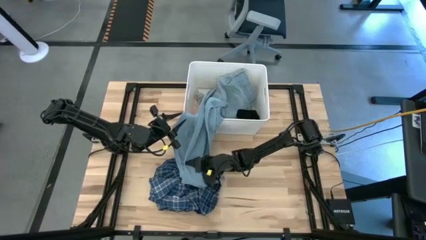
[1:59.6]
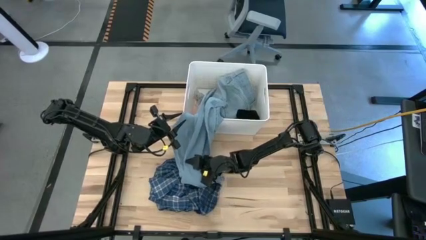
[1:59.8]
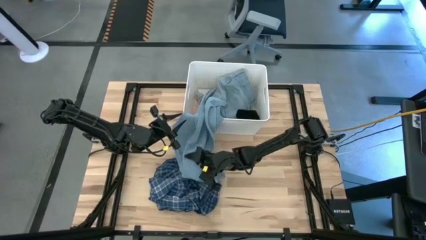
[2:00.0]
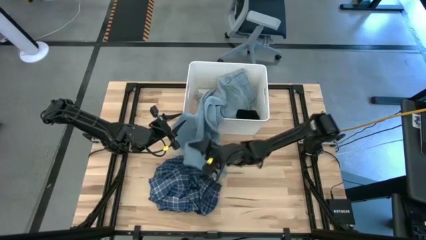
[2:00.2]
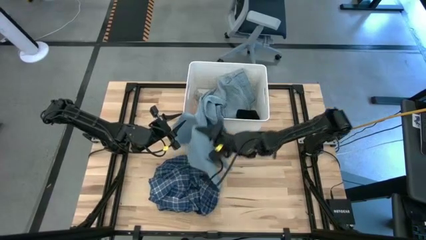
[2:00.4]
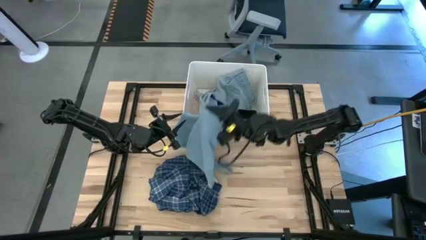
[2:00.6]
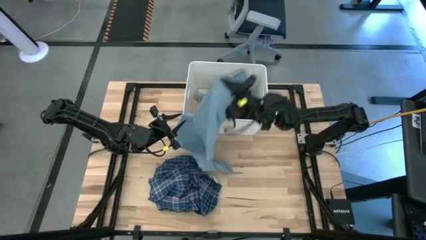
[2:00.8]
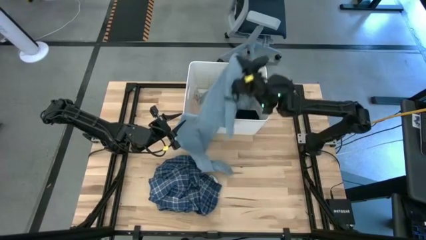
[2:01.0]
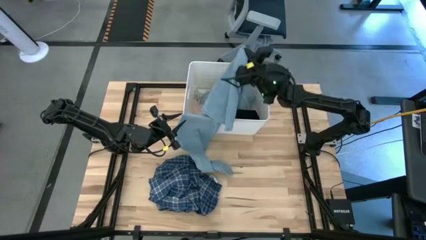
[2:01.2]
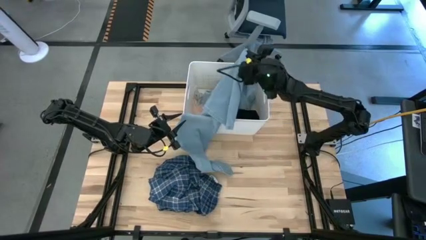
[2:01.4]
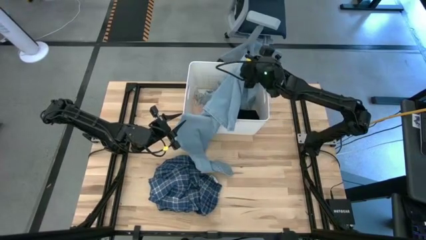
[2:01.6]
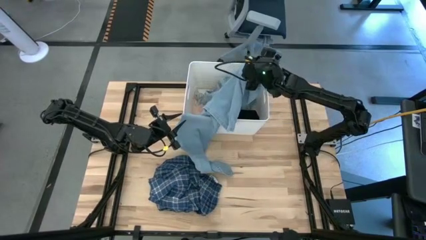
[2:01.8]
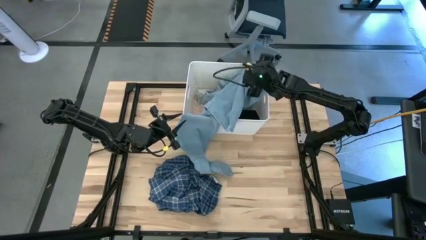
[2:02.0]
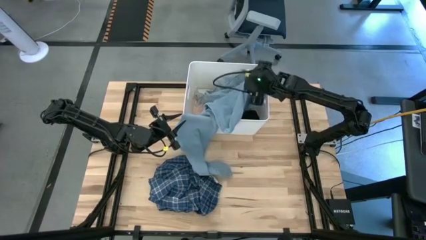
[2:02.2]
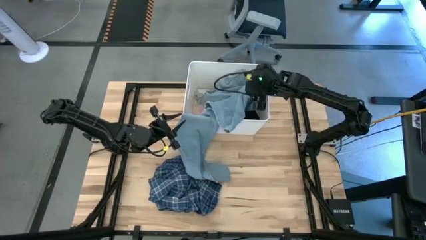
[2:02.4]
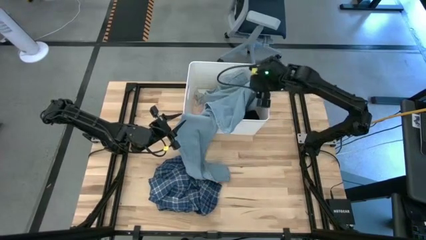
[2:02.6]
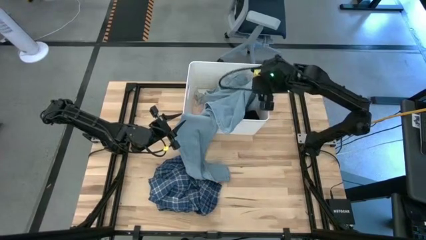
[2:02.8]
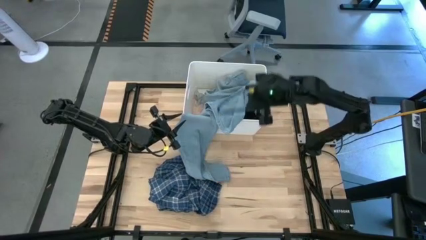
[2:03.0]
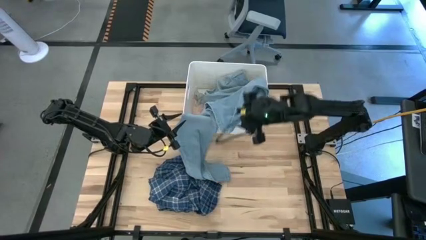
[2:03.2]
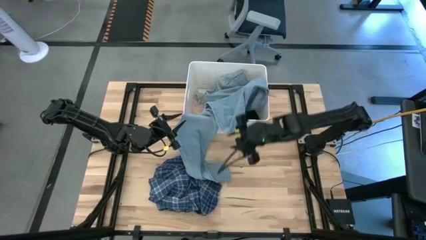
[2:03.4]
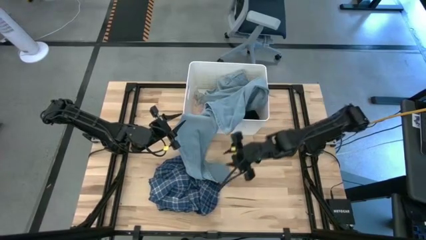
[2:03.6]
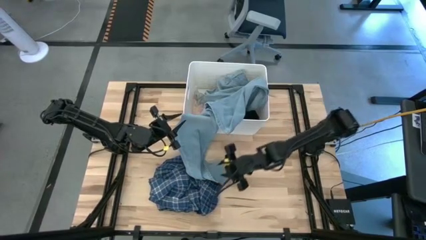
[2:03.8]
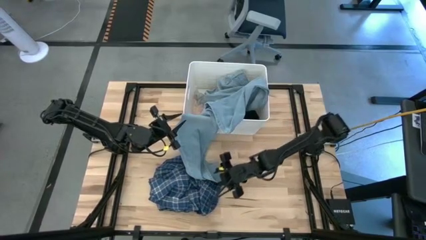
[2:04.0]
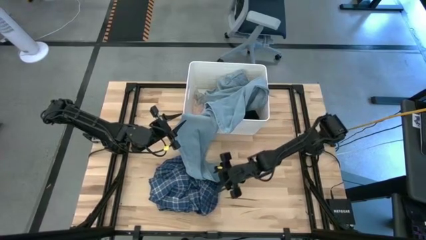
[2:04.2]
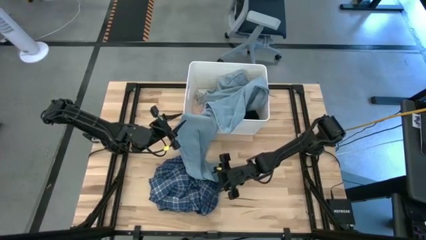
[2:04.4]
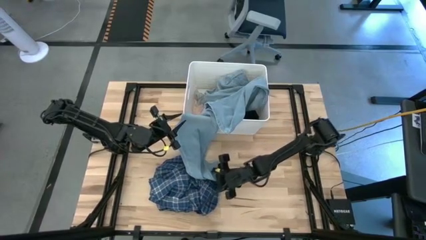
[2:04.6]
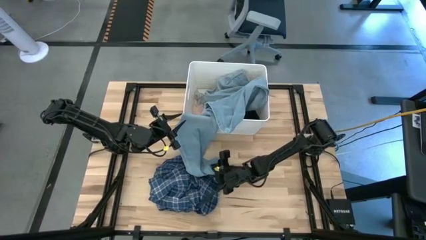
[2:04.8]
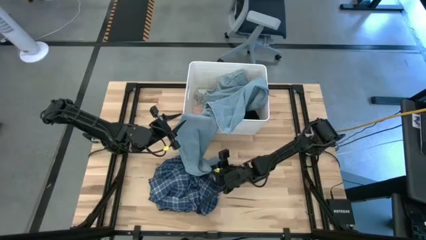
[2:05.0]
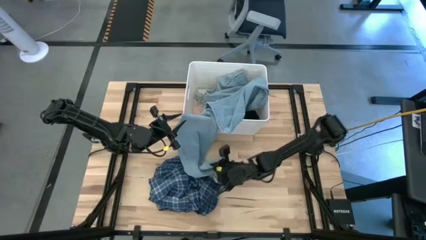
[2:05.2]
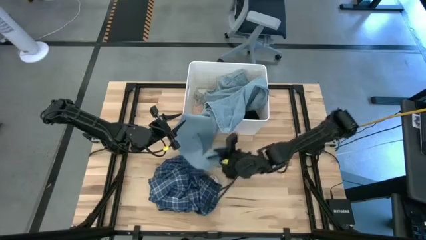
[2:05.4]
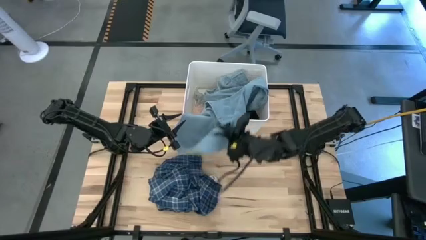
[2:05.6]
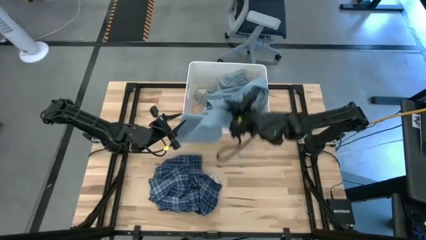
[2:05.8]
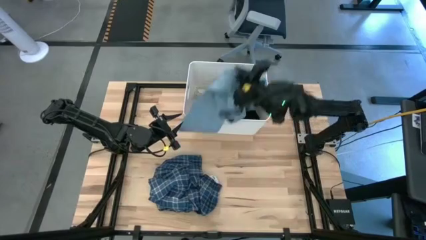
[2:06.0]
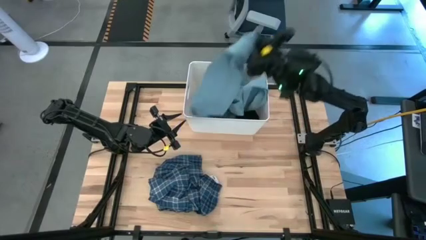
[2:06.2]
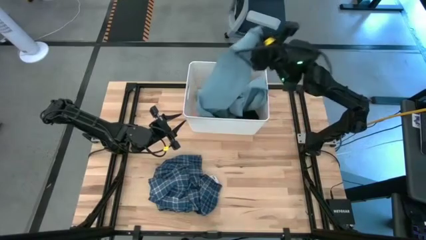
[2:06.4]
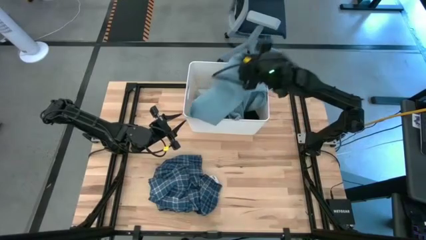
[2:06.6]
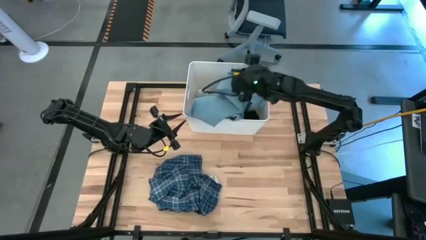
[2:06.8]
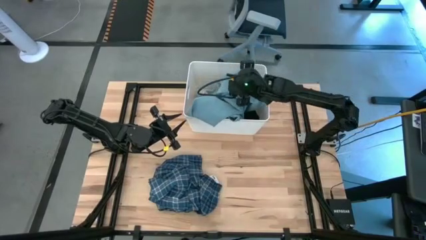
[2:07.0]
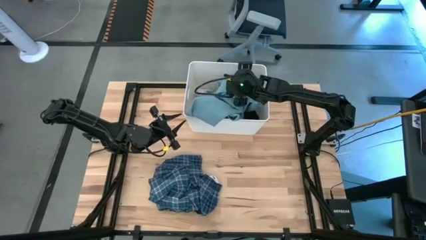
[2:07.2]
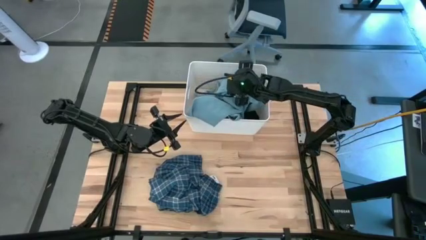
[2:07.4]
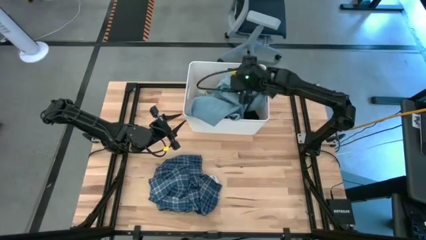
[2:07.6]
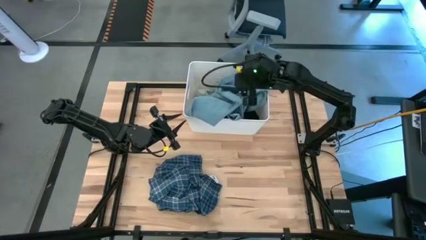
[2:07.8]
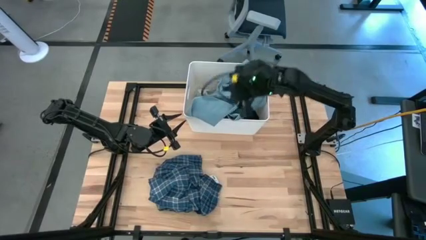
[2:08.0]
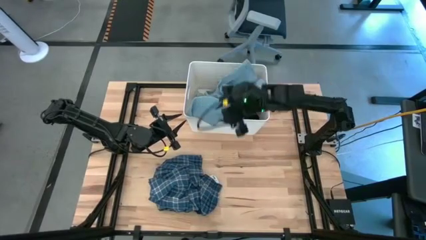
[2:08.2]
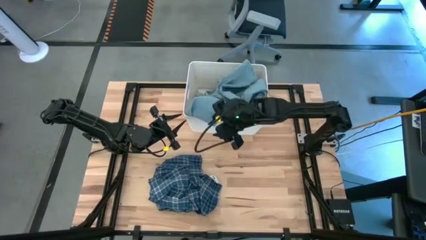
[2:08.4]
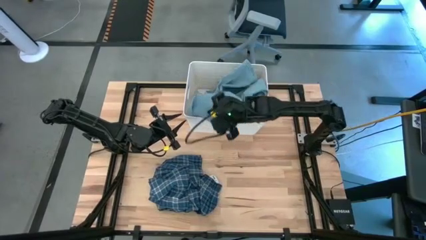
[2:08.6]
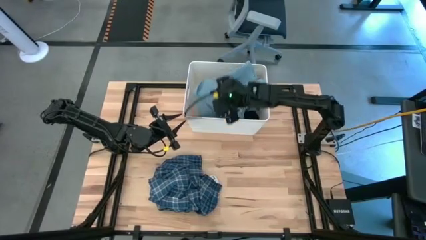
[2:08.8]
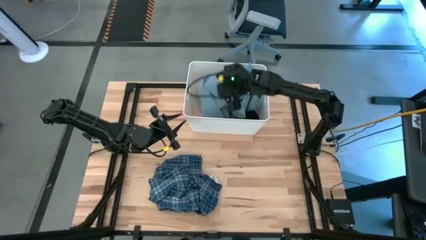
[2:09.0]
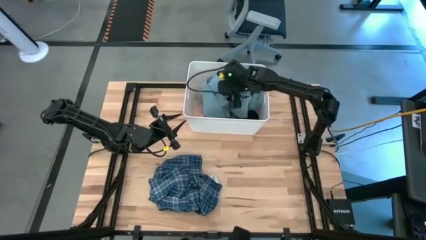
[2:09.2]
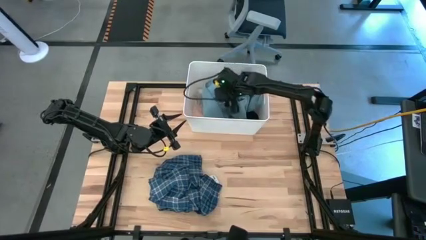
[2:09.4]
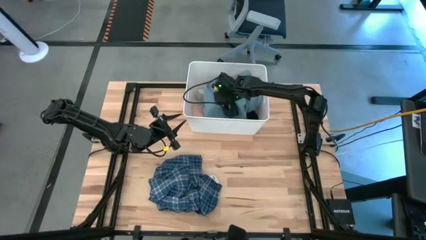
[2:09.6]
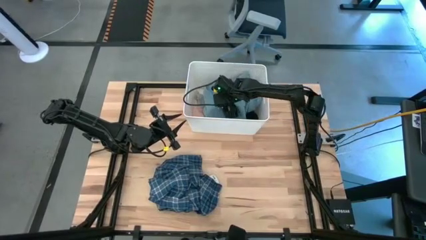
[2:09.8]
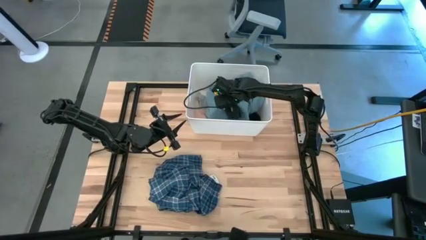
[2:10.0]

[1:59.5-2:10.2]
Task: Sort clothes
Put the blue pants into the white laundry bin

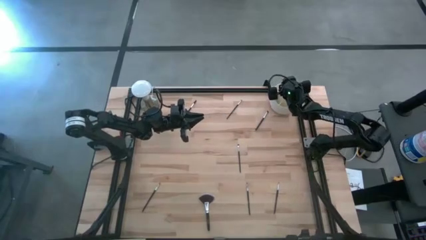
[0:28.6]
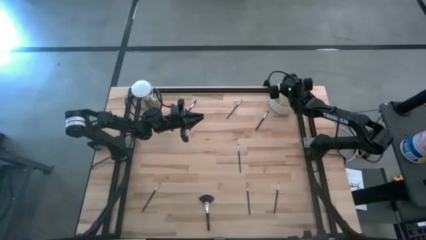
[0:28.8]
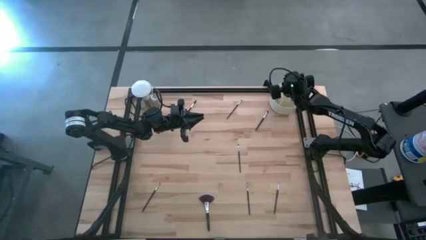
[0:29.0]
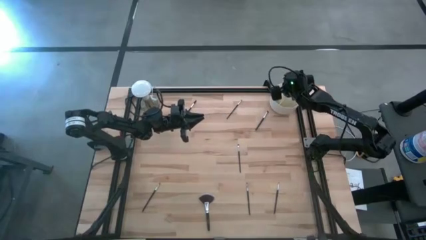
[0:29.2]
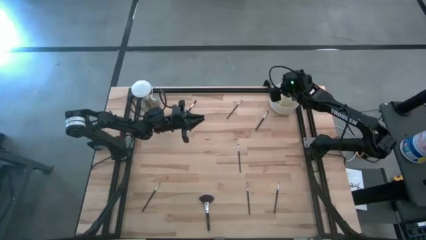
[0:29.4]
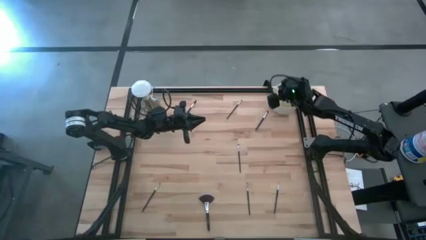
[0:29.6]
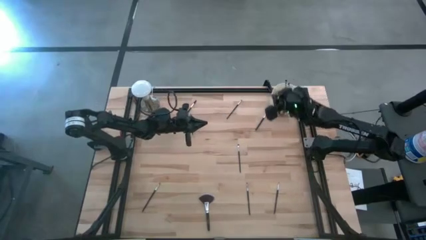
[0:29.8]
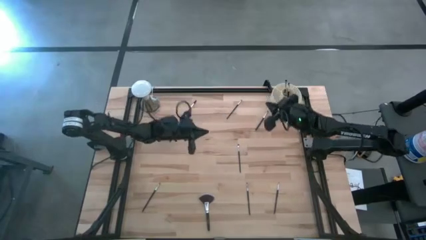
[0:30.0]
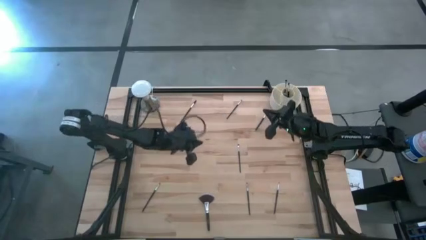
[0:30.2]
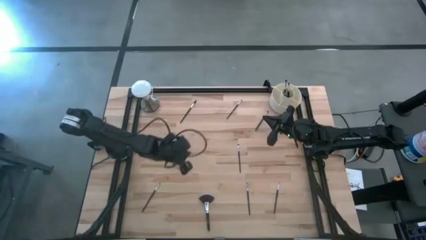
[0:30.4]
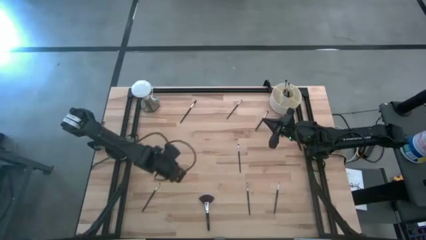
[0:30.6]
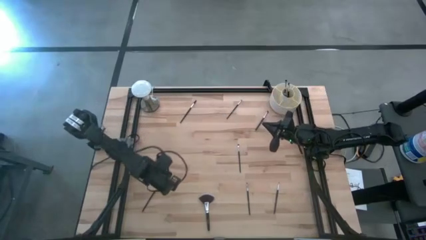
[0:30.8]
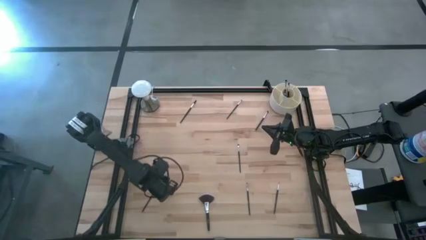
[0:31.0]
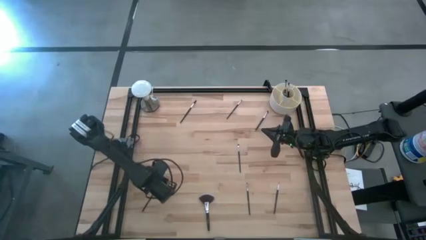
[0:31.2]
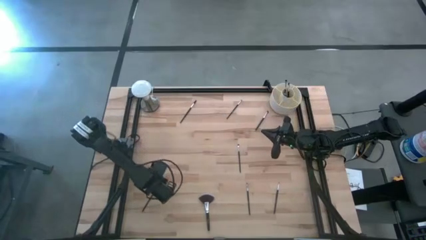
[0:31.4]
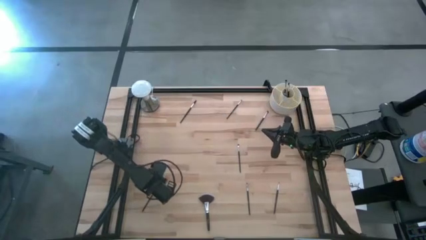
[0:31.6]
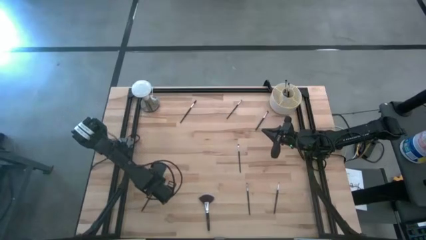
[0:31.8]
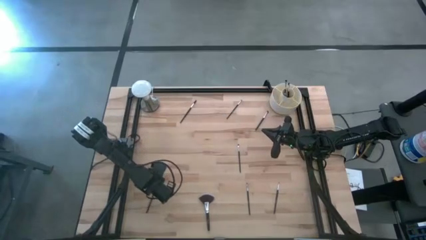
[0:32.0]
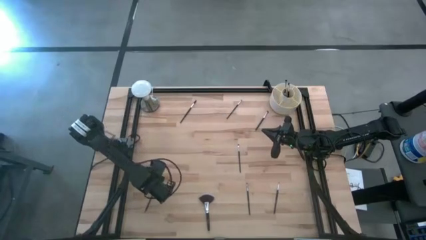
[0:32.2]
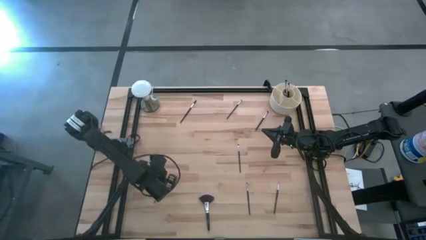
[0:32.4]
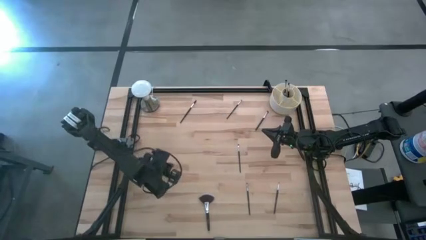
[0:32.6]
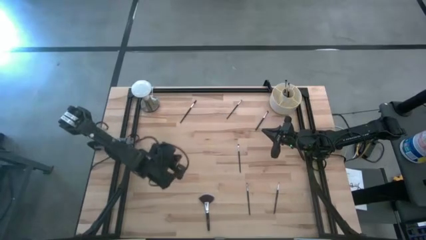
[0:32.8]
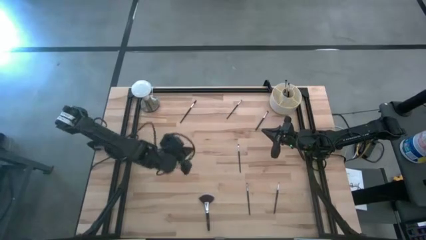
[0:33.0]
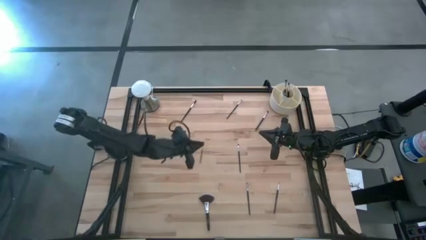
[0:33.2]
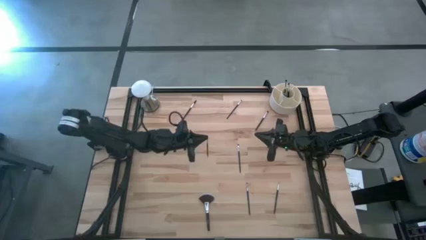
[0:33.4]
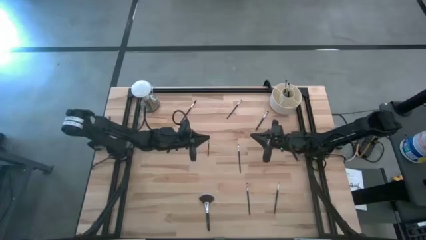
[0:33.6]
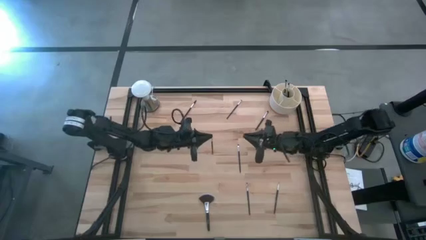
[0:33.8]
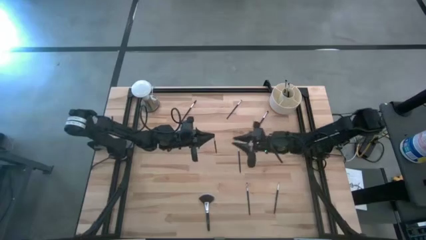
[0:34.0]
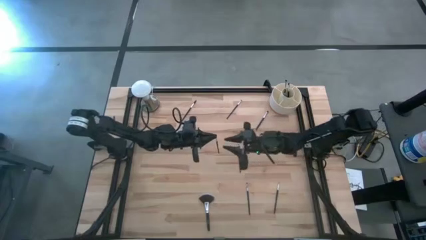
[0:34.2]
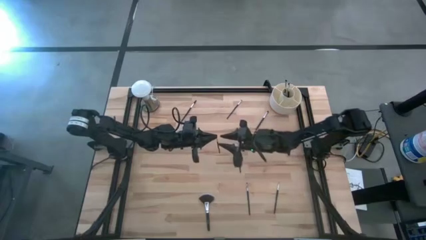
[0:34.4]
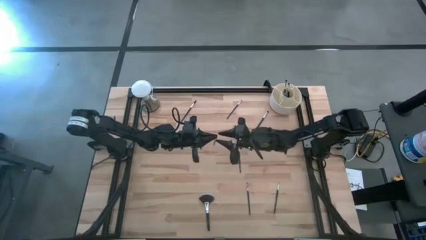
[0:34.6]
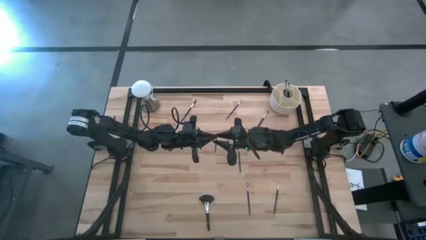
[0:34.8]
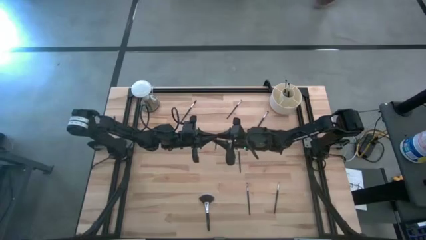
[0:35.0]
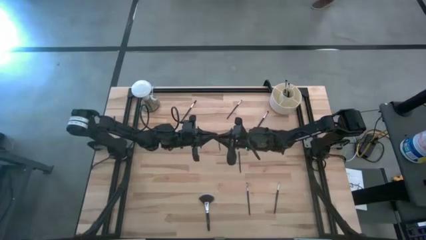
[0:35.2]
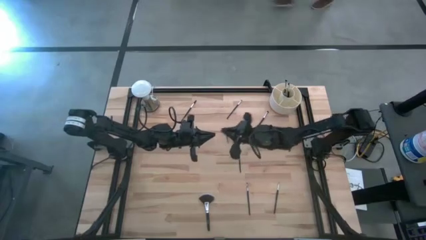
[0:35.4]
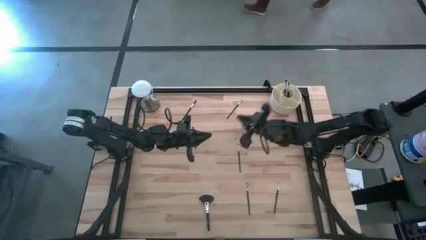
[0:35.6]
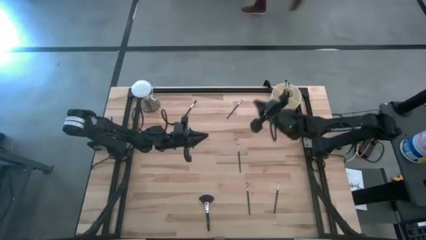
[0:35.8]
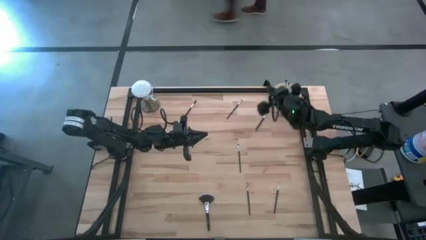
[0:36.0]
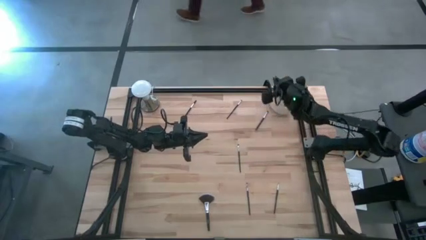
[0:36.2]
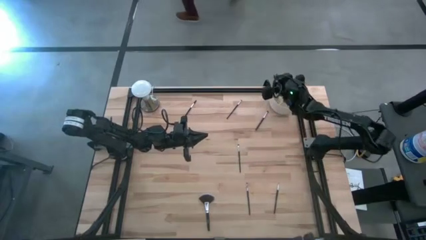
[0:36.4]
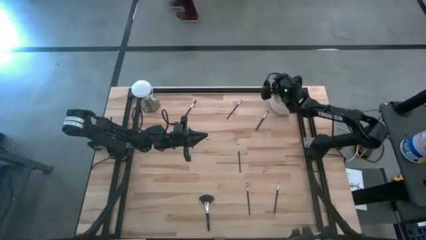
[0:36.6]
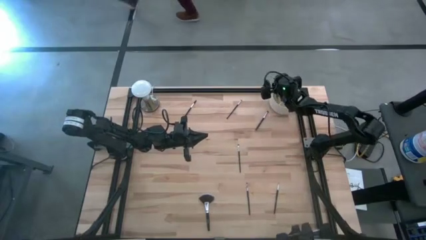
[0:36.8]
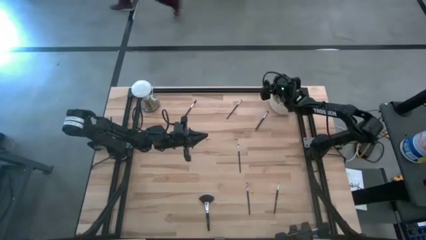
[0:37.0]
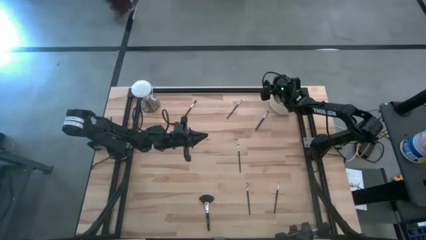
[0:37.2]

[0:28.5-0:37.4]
Task: Pick & Place Makeup Brushes
Put the black foundation brush into the white makeup holder
